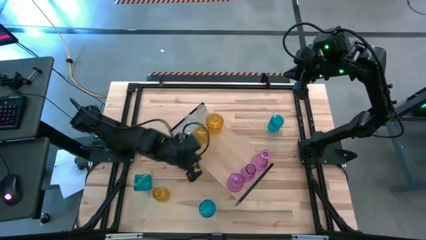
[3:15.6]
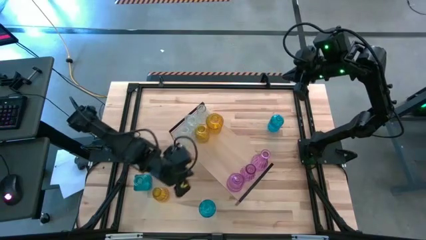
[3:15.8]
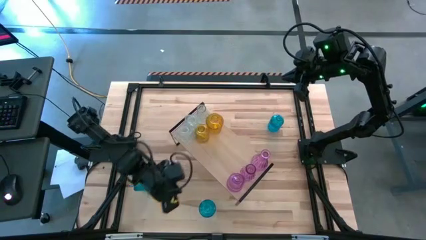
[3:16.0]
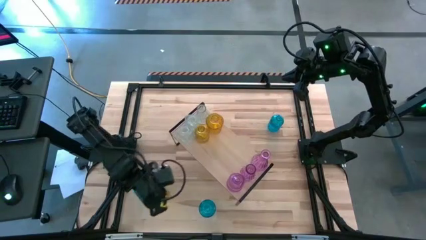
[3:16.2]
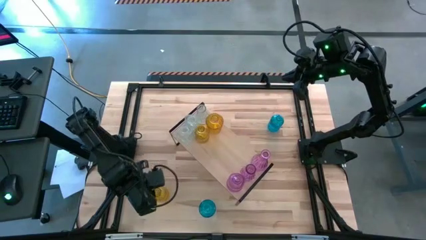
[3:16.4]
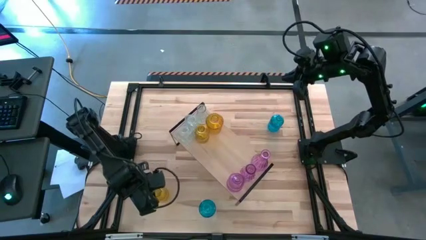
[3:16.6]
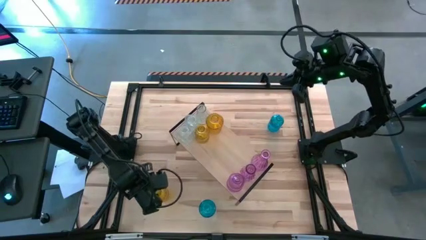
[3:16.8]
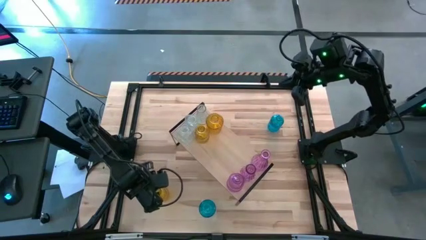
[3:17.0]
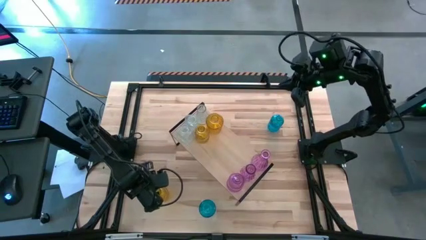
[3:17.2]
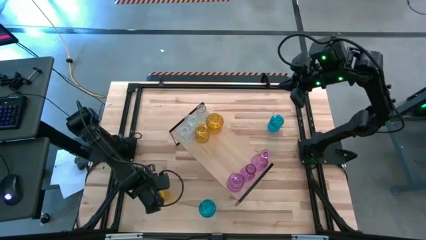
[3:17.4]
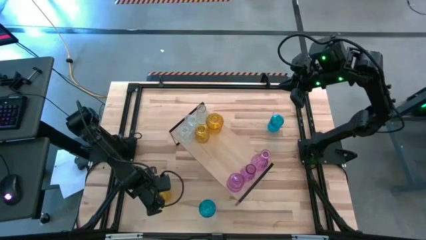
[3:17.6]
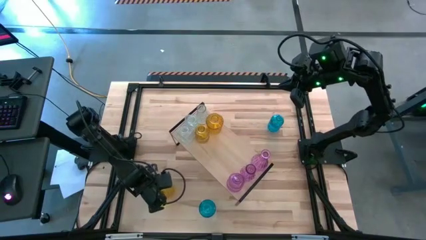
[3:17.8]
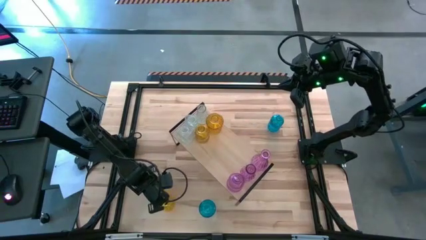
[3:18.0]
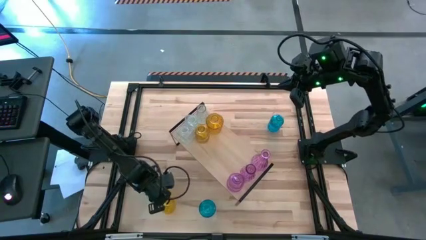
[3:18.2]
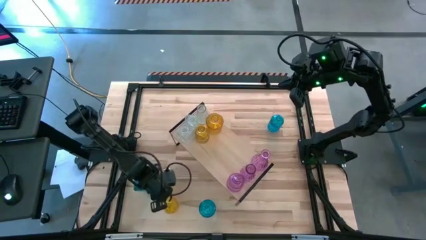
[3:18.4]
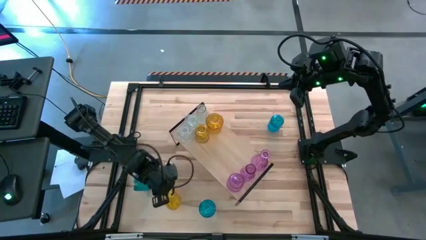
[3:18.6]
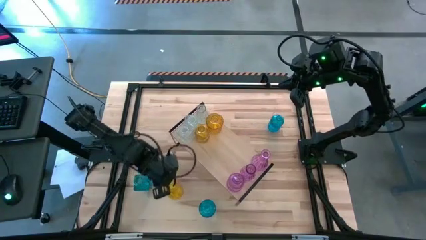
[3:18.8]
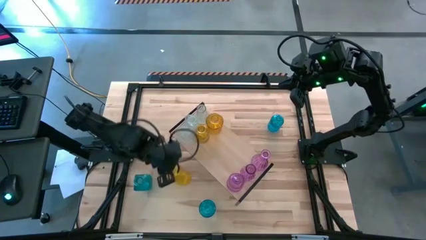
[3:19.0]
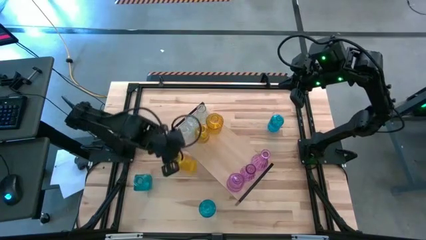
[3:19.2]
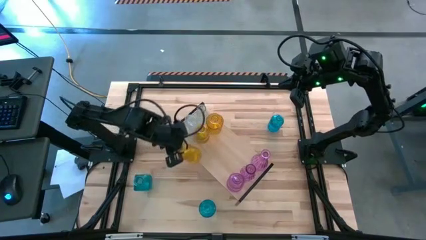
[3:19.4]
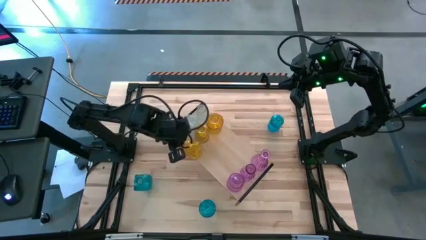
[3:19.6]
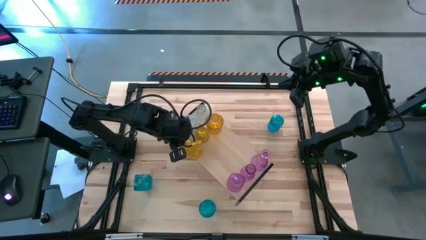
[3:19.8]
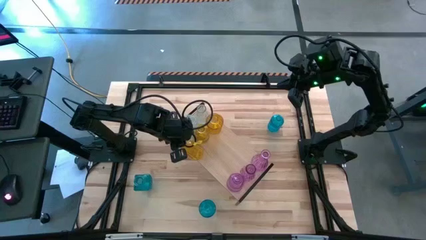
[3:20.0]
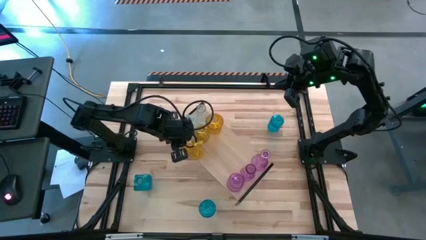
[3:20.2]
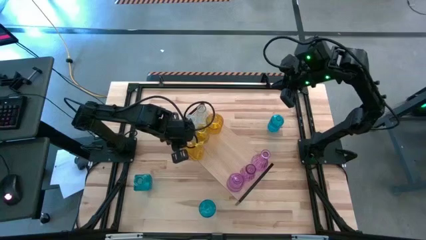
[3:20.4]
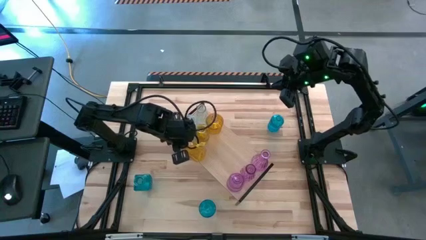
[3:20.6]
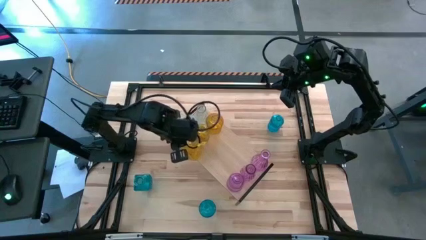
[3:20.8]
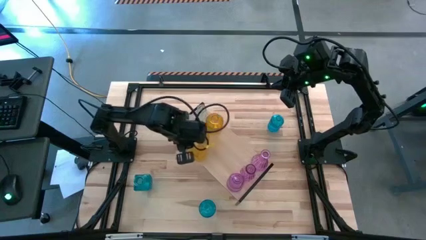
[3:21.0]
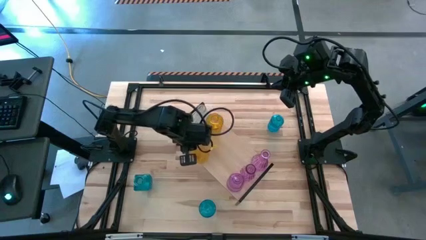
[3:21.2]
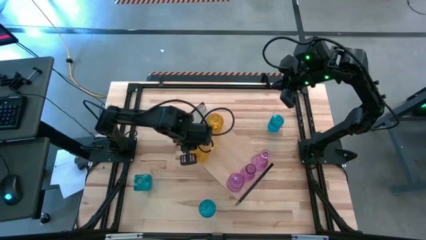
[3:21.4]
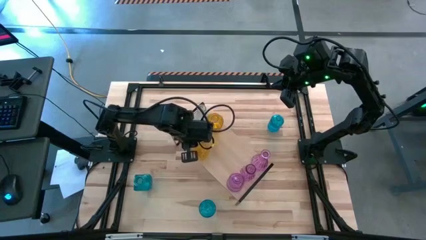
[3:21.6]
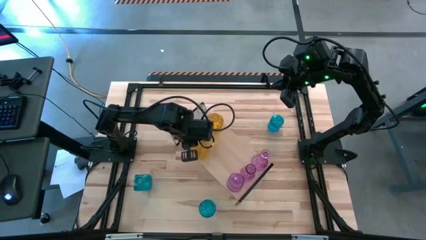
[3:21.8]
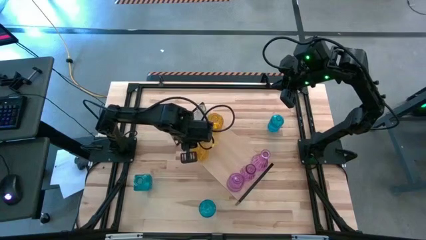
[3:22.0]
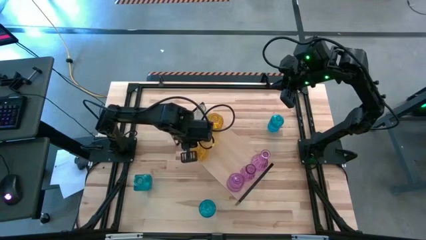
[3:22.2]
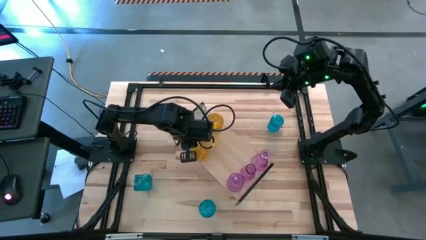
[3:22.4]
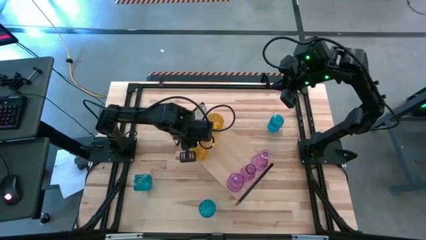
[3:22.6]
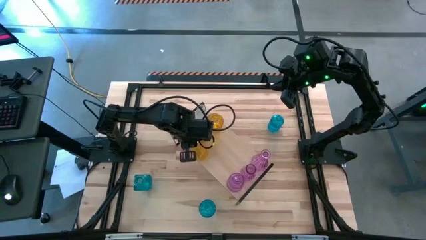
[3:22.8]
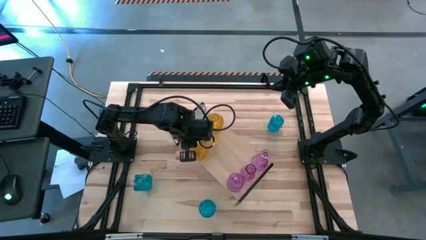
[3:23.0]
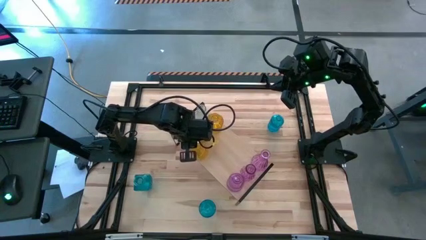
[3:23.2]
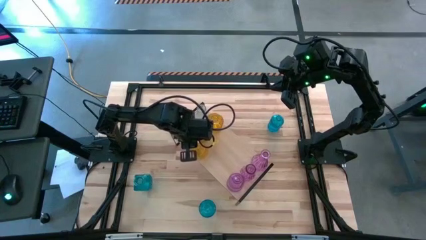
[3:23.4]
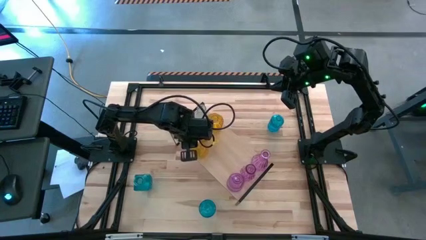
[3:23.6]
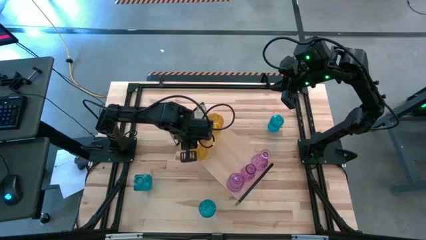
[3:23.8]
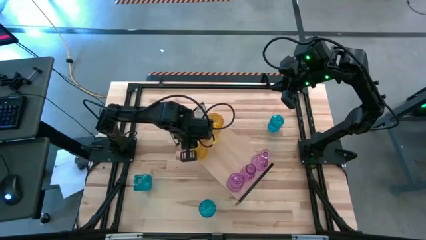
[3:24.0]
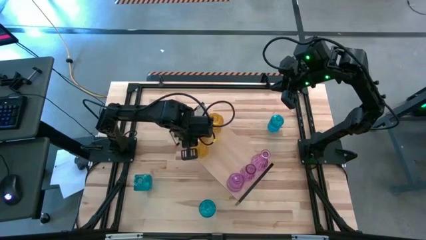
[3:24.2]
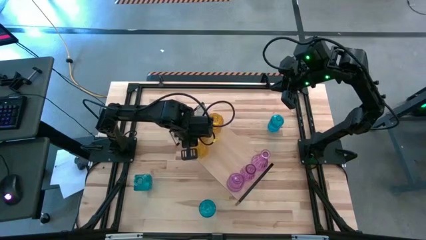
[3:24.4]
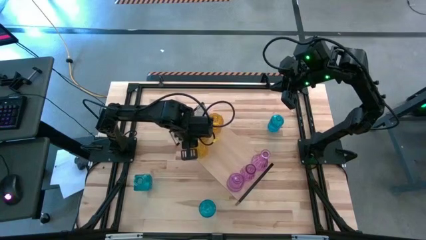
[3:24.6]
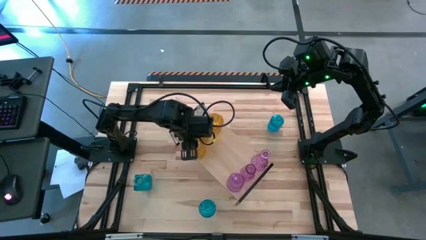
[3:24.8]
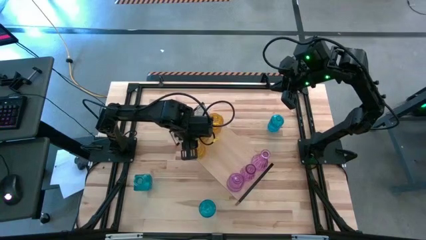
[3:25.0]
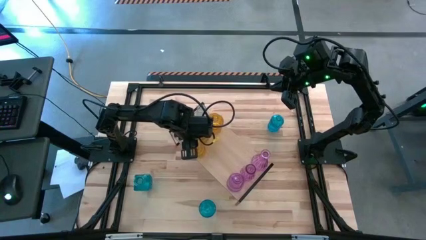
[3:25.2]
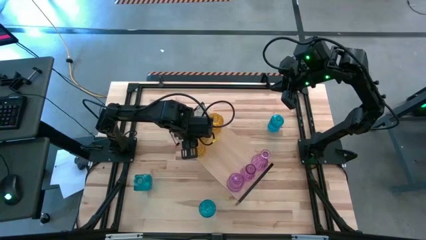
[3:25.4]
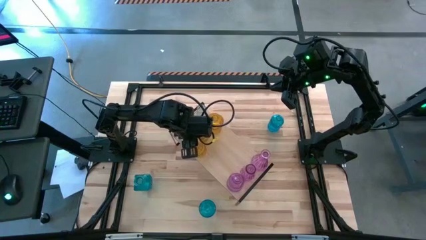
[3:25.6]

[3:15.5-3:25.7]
Task: sort vases onto shelf
Put the yellow flower vase on the shelf aligned with the other yellow flower vases

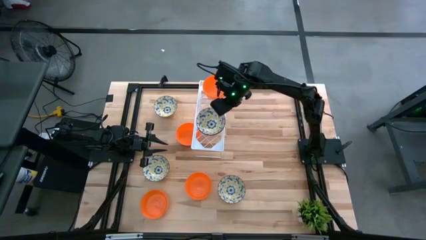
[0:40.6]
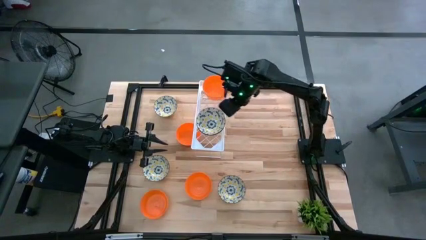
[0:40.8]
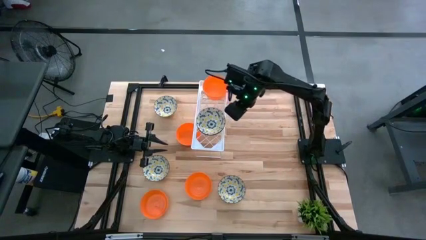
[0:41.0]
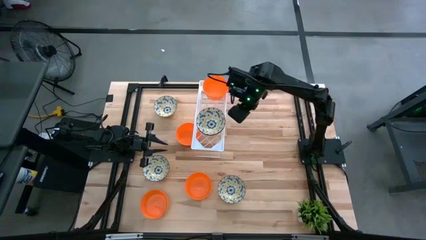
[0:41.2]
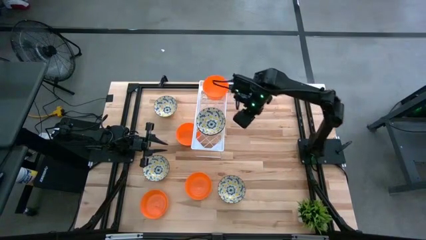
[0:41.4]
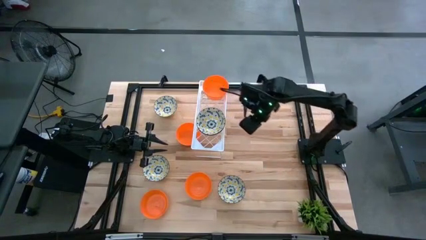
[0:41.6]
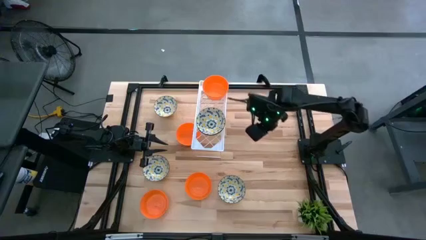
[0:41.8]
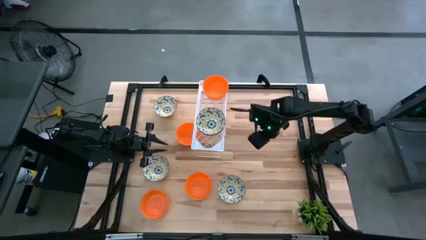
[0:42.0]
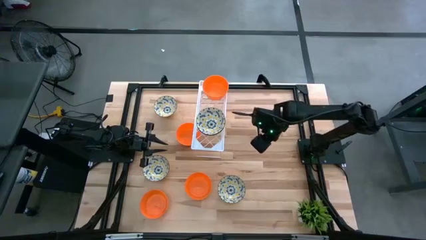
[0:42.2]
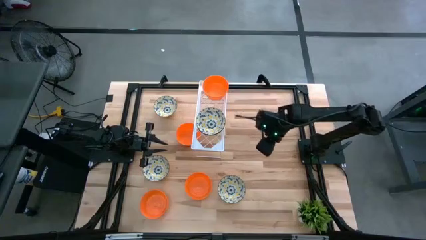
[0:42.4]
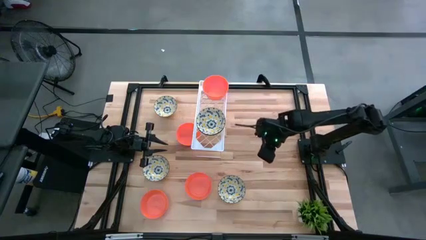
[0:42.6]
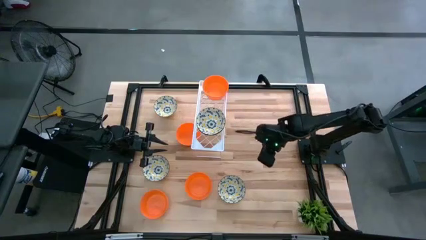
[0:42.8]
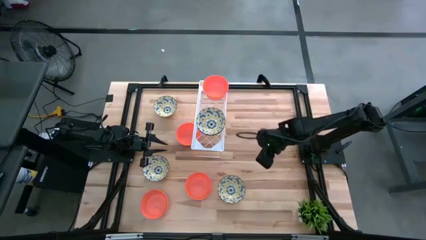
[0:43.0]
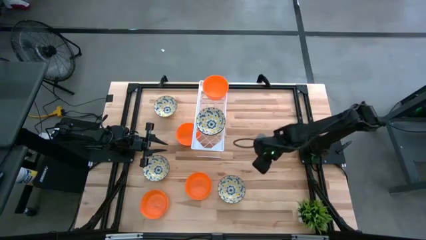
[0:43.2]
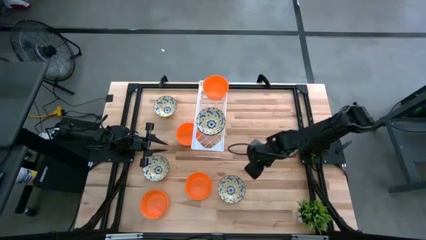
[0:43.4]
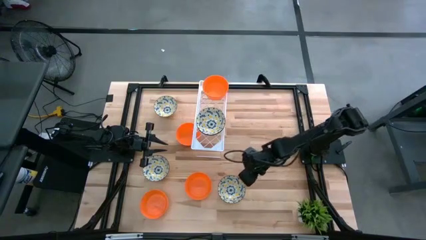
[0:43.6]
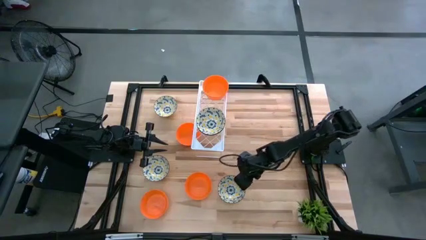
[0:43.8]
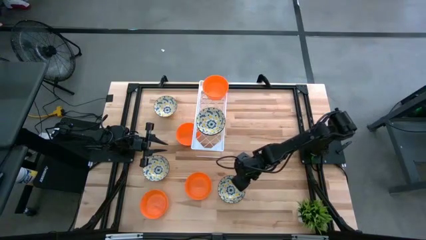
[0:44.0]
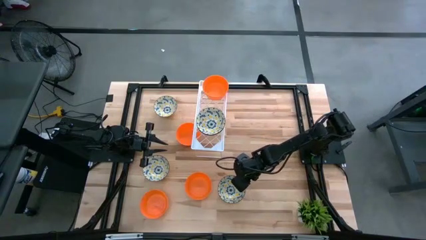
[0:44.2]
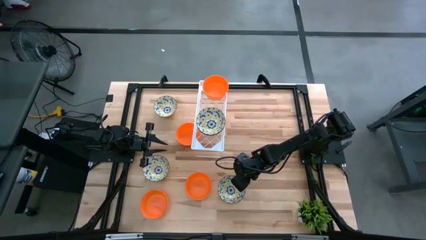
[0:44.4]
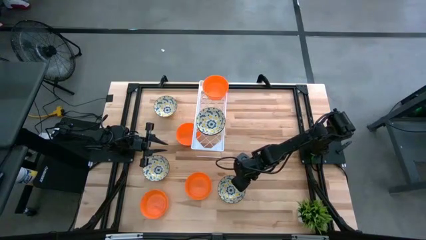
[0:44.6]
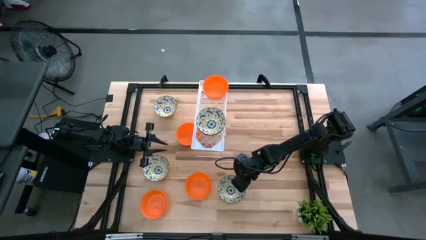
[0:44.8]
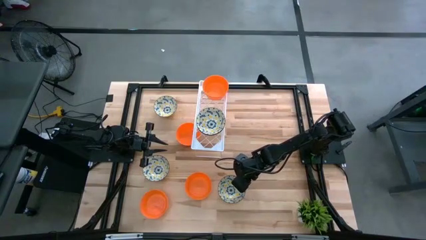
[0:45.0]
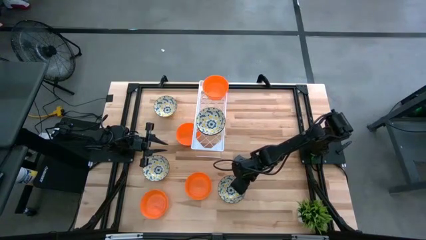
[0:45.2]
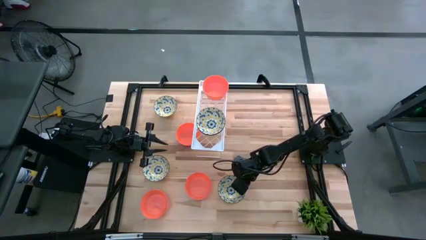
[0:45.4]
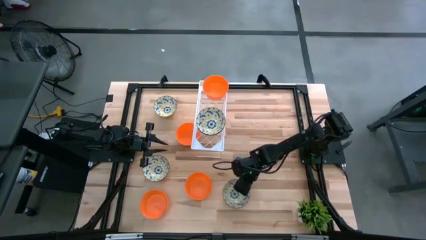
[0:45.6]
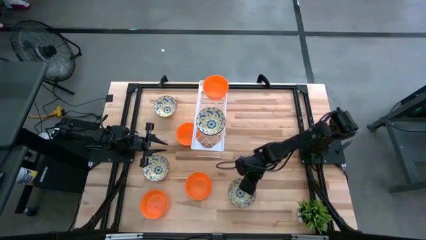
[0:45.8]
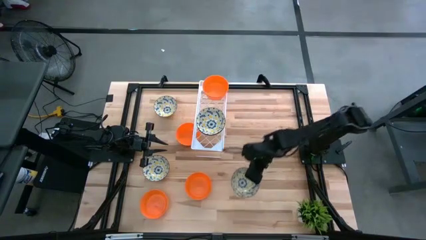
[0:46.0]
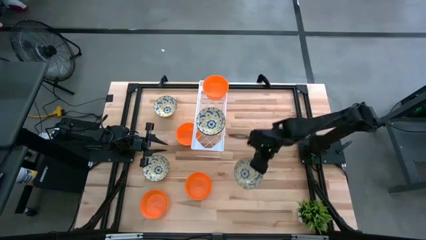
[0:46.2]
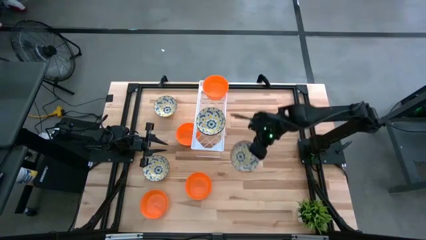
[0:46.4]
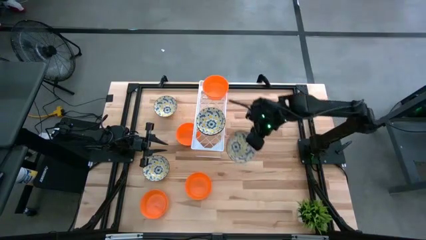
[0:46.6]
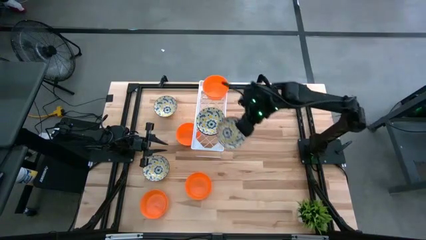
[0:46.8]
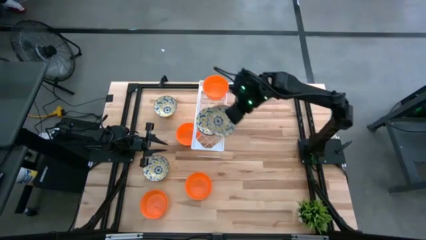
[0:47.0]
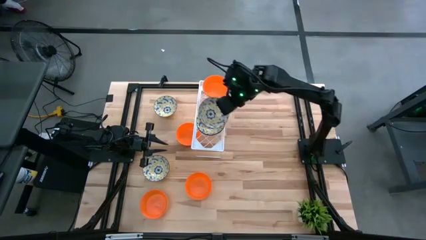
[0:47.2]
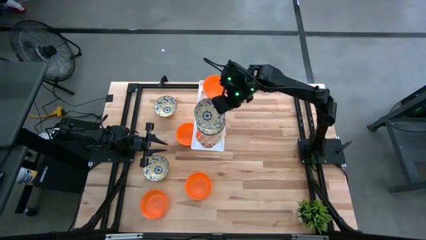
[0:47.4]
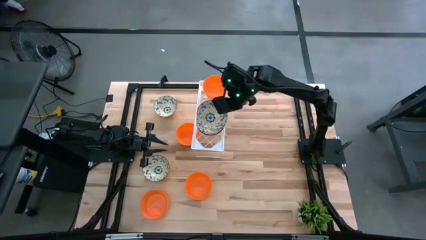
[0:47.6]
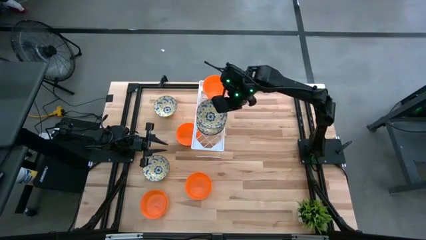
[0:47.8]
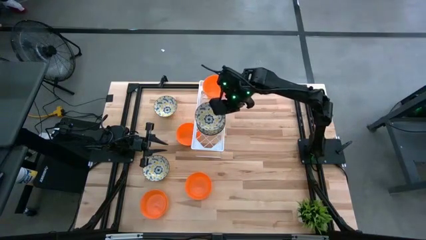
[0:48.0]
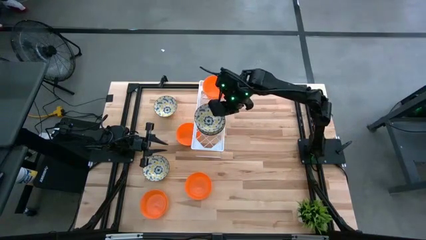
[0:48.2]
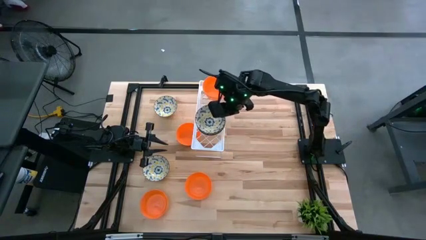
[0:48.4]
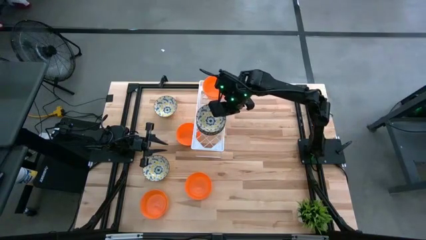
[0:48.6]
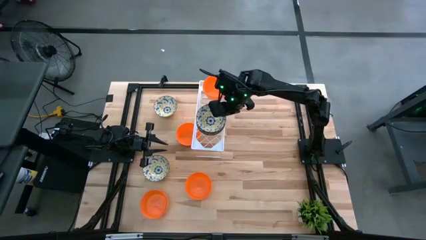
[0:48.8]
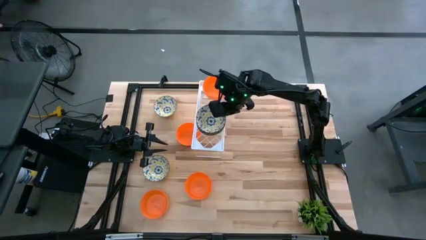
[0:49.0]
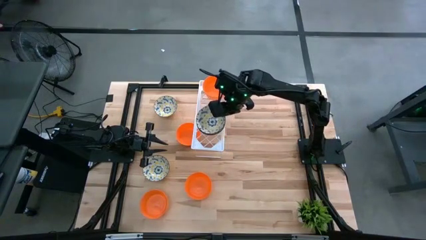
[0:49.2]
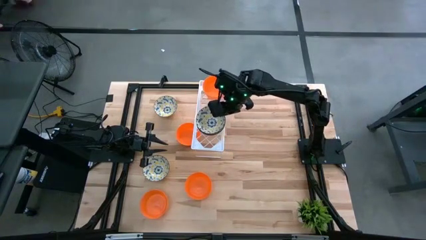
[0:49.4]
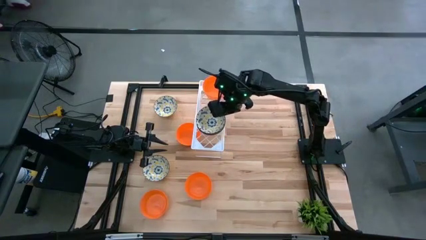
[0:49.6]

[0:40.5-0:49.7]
Task: Pick & Place Mini bowls
Stack the white and yellow bowl on the stacked white and yellow bowls on the shelf
